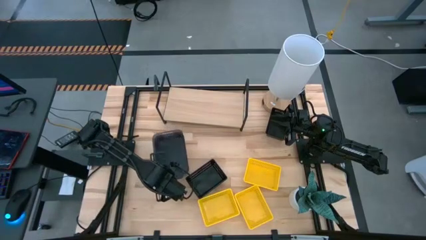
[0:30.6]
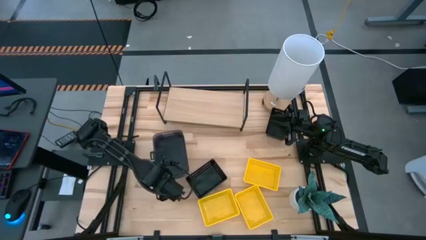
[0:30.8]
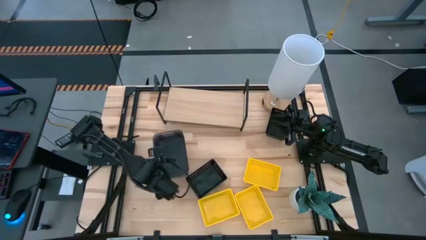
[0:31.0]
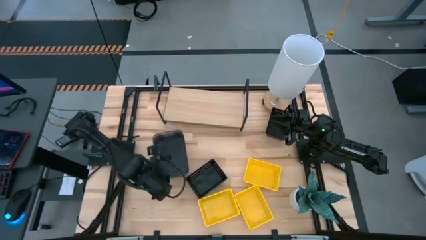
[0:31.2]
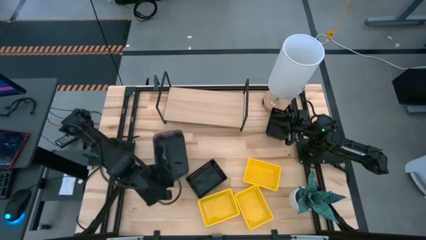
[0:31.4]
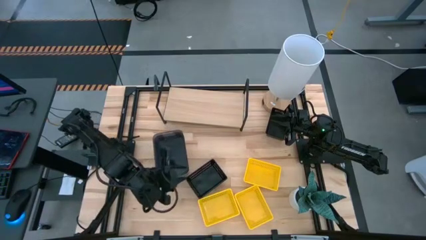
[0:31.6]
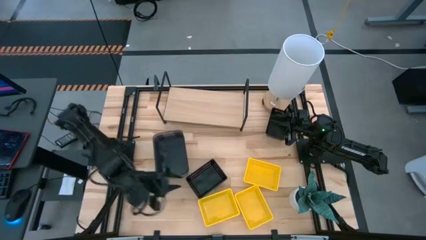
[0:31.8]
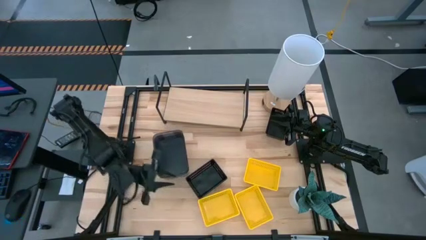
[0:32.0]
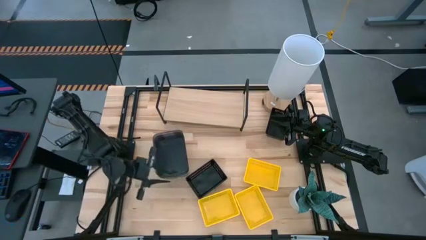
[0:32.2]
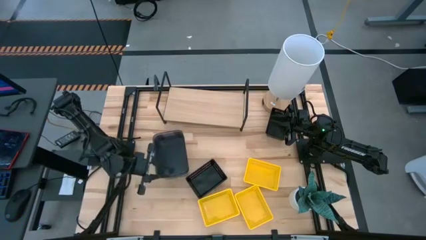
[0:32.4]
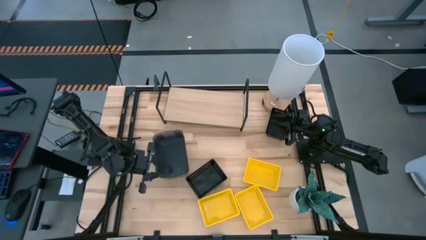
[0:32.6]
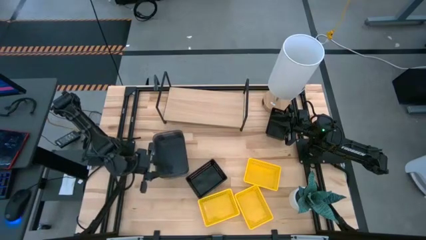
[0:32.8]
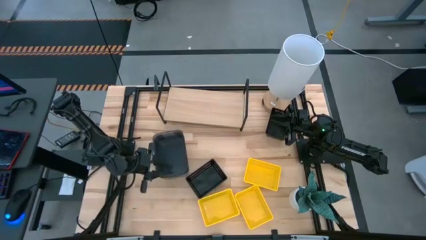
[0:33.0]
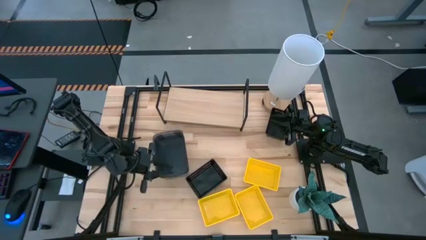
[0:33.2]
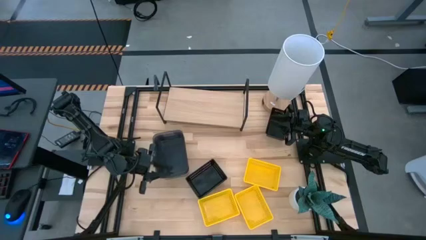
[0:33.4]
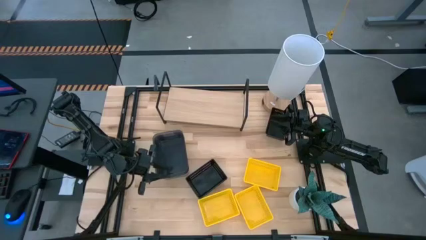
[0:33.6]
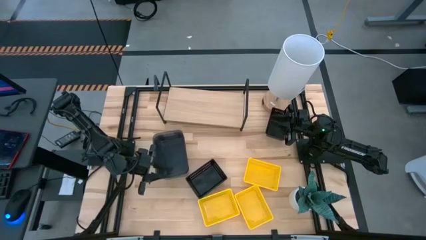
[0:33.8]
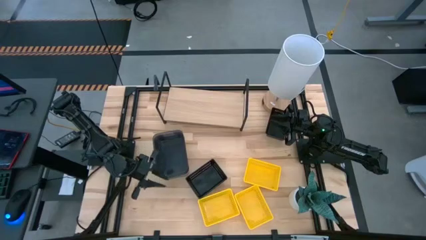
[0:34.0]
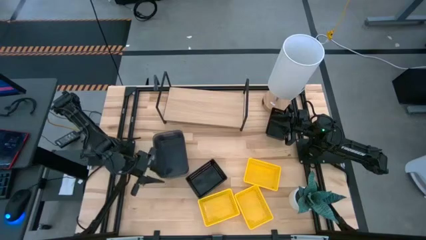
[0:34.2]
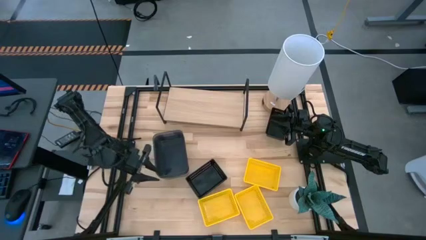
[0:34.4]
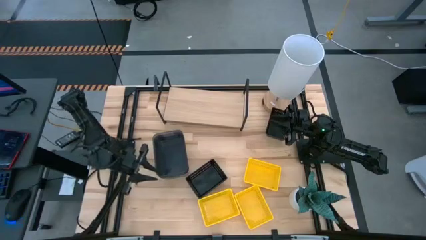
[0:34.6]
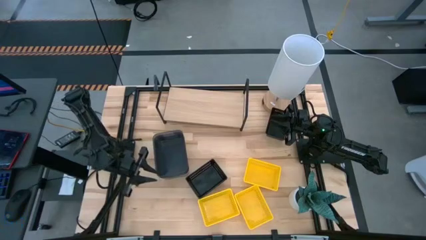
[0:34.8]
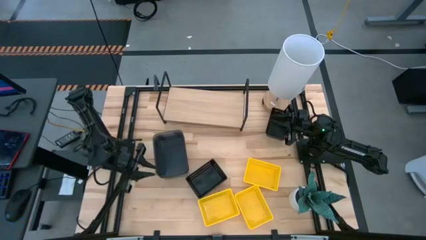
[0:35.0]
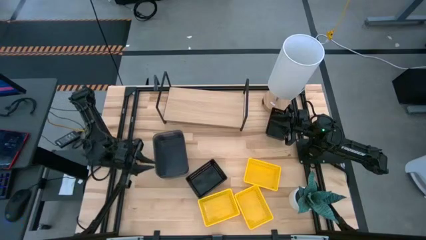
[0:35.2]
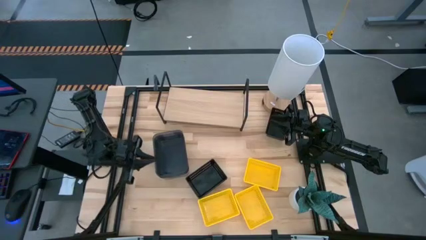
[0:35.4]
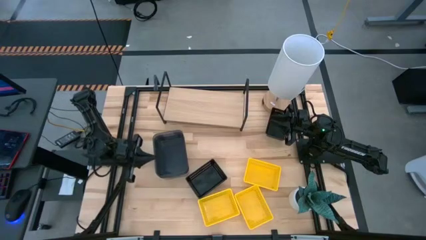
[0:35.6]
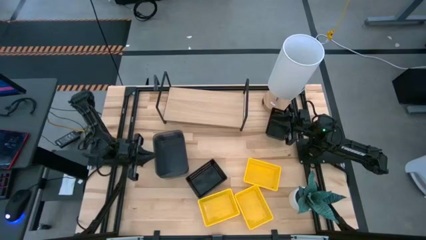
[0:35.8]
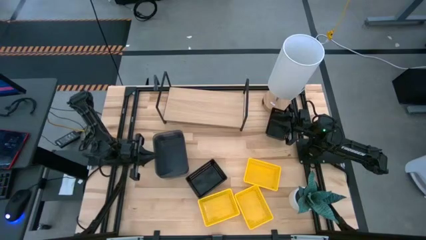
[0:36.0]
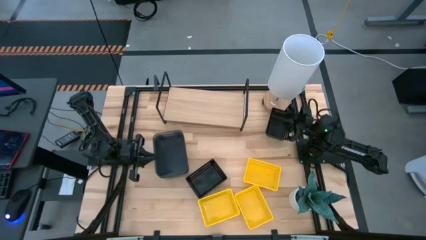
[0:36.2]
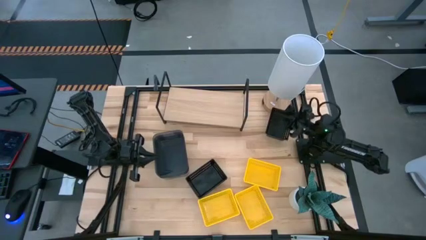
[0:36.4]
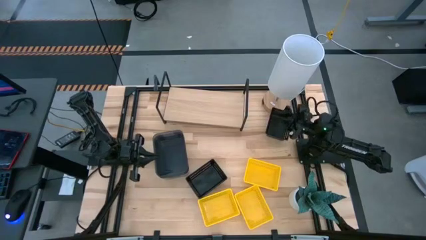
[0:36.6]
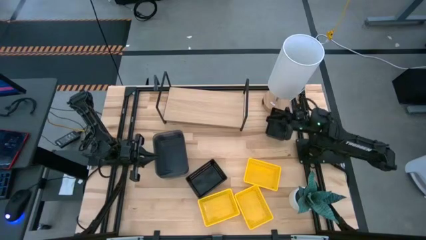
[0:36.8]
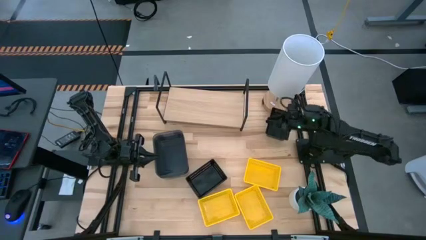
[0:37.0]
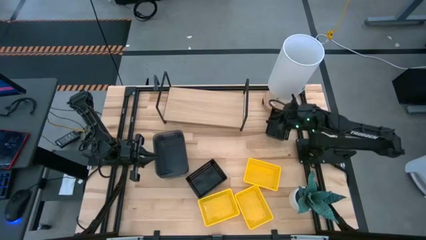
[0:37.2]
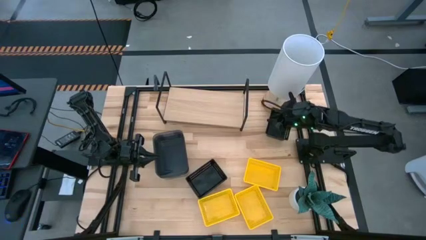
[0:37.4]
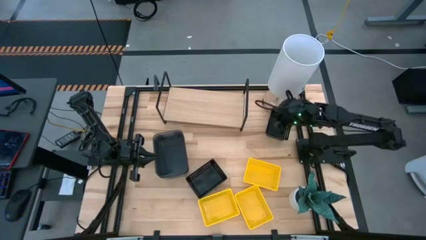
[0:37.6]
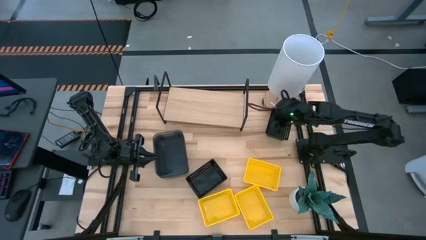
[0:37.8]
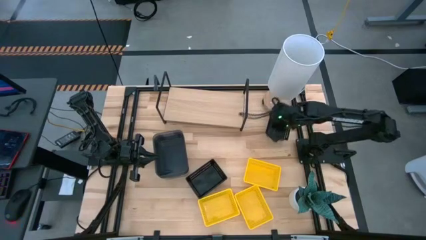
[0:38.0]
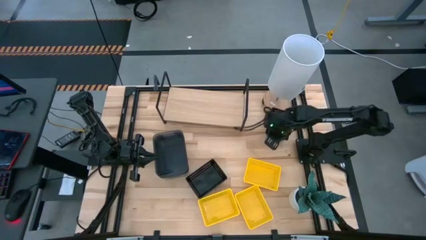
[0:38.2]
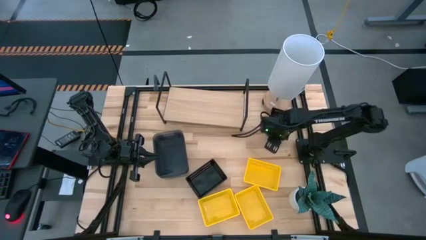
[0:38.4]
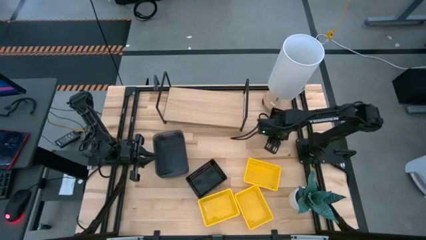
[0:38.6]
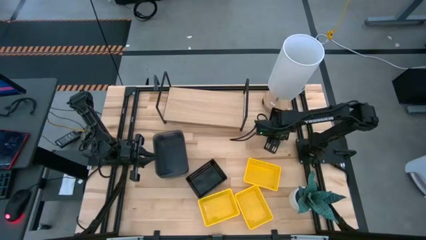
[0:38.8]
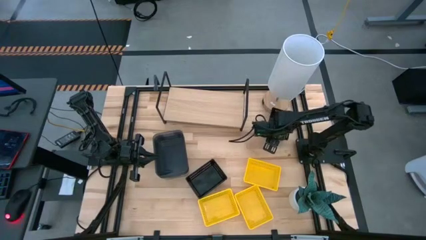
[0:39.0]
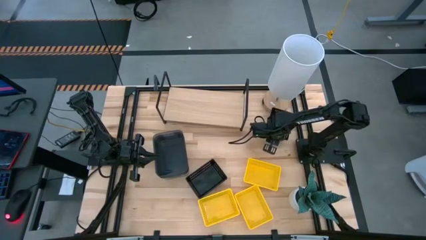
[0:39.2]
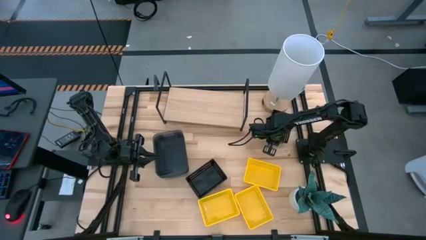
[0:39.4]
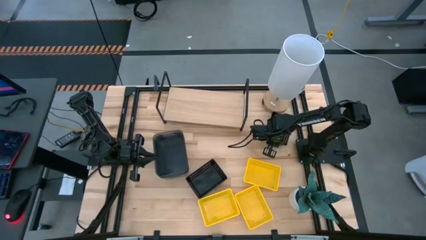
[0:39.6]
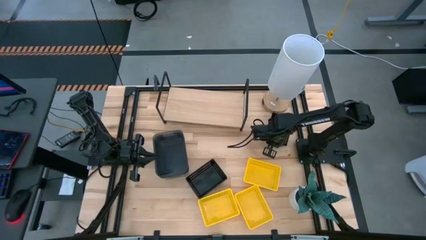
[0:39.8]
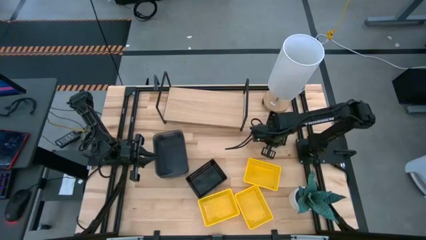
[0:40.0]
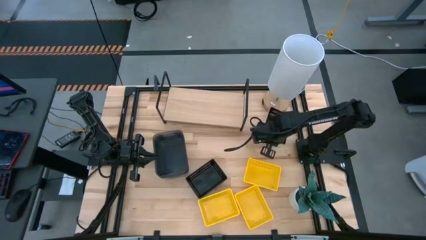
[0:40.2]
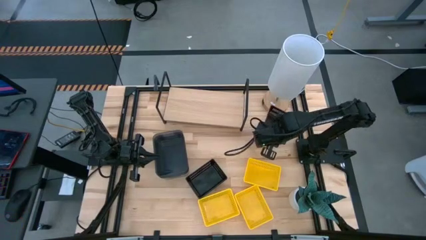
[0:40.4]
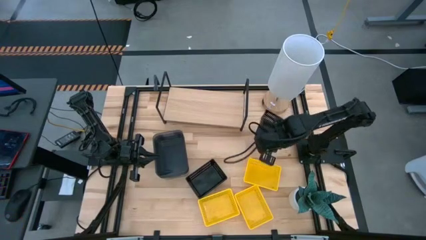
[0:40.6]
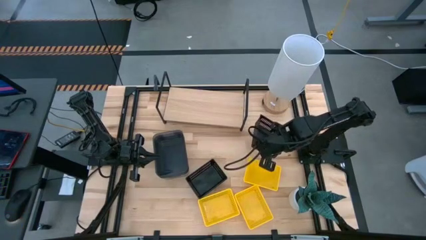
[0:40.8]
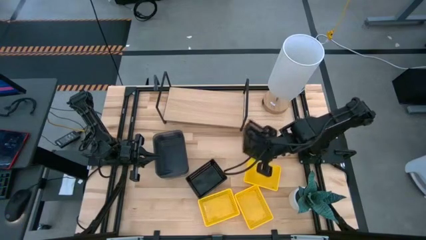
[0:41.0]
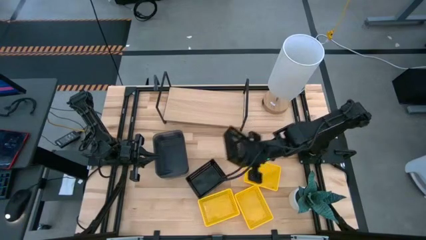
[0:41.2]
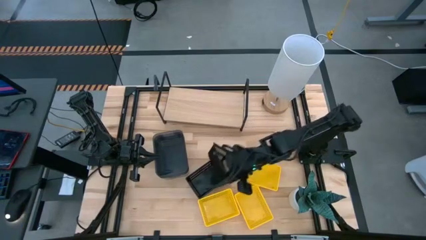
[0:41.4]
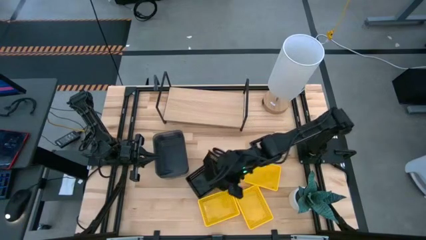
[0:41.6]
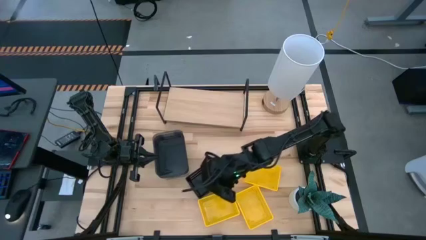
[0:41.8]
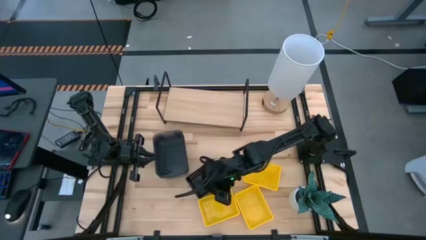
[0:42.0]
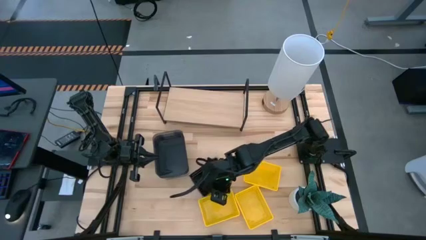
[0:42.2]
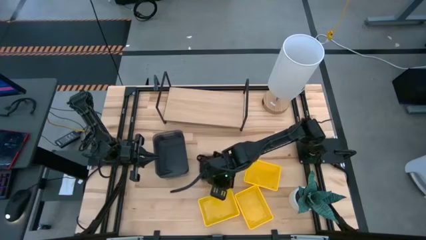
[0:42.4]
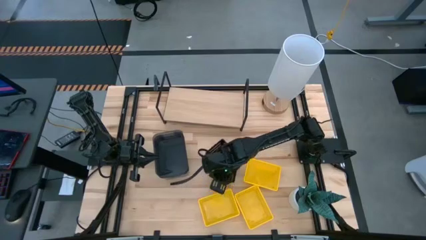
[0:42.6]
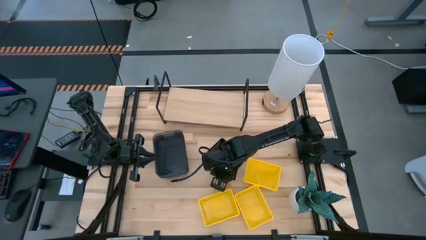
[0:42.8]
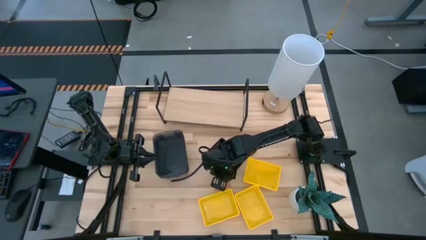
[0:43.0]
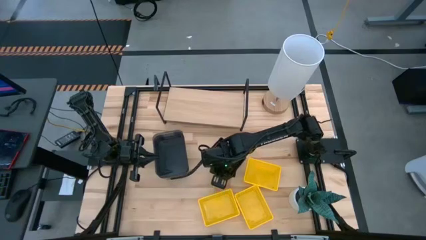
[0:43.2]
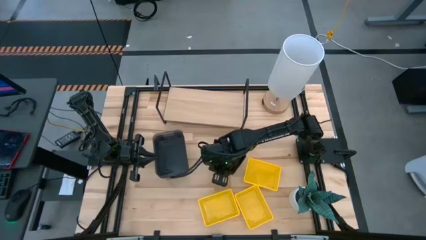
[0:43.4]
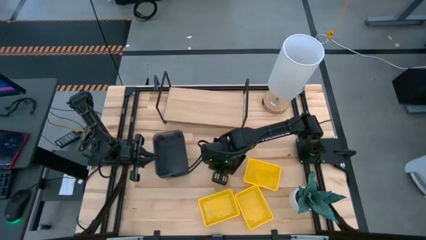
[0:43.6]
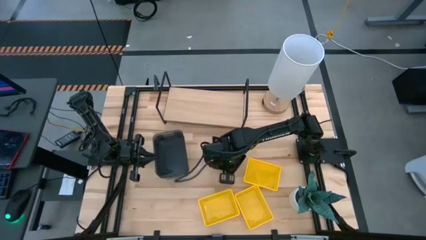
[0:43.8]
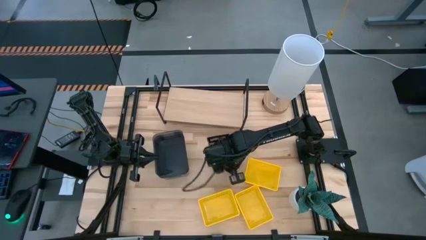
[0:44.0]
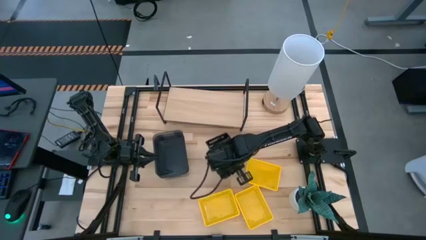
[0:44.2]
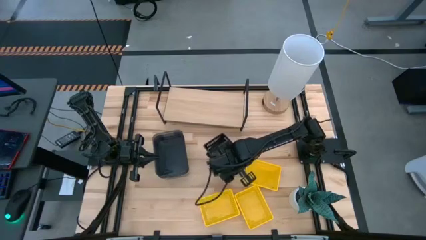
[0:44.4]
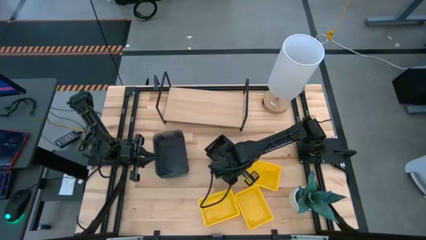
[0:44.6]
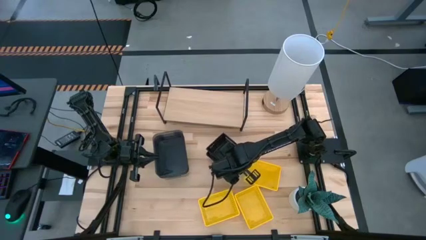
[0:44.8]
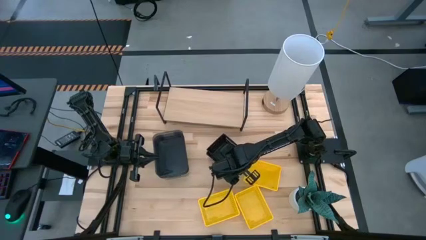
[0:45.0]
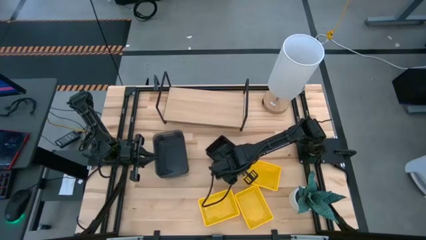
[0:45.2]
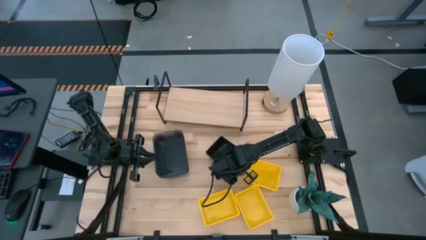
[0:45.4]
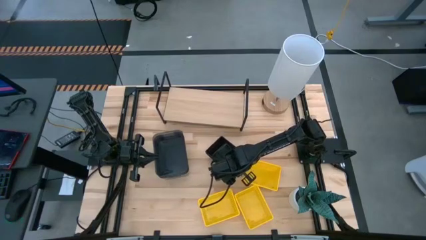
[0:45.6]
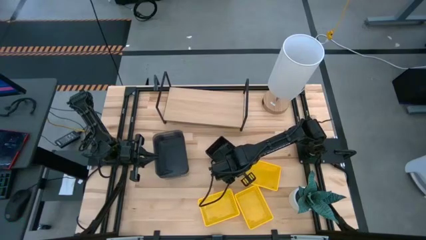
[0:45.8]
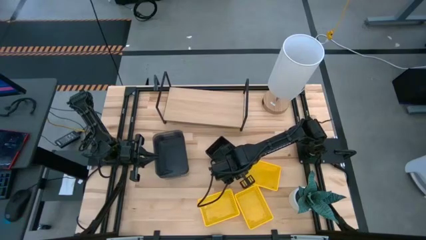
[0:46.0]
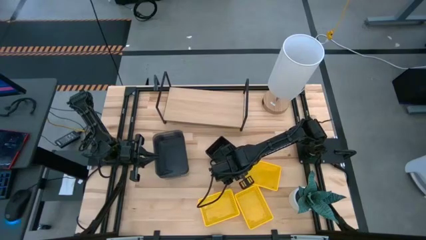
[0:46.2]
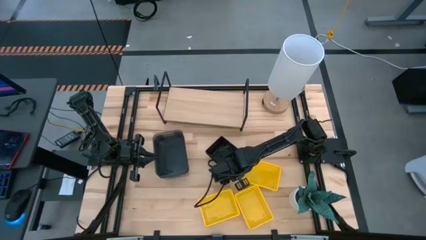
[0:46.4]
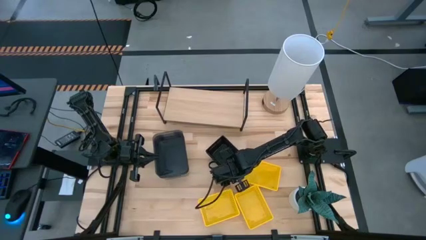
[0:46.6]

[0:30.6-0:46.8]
Task: Stack baskets on shelf by color
Stack the top black basket on top of the bottom black stacked baskets
